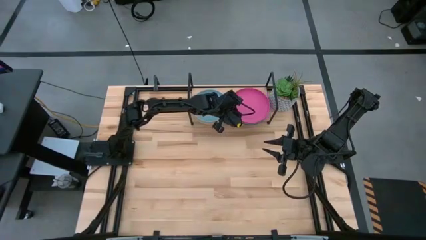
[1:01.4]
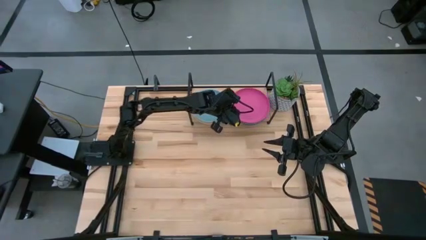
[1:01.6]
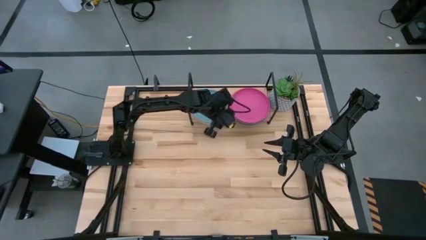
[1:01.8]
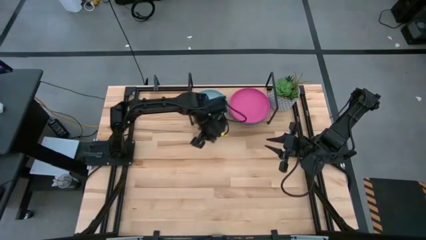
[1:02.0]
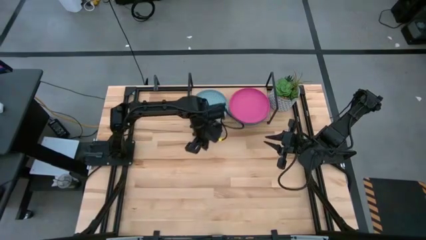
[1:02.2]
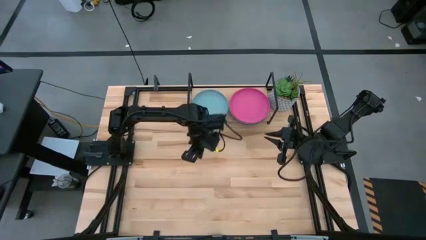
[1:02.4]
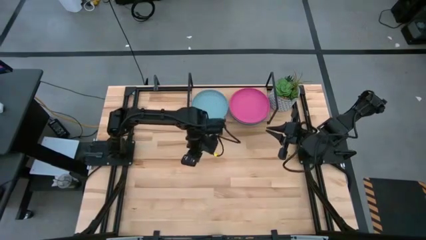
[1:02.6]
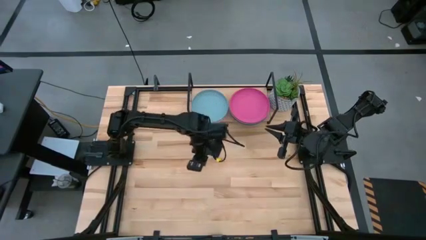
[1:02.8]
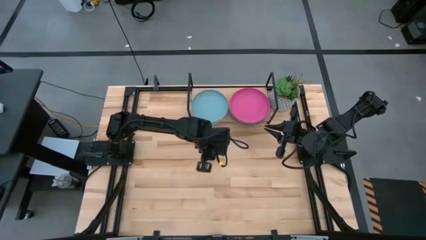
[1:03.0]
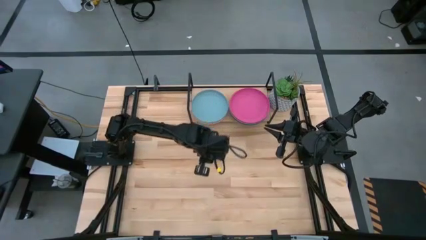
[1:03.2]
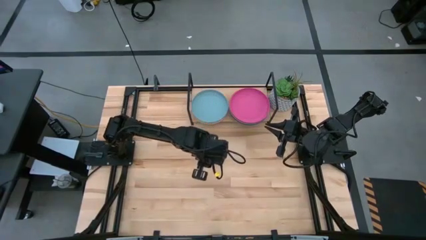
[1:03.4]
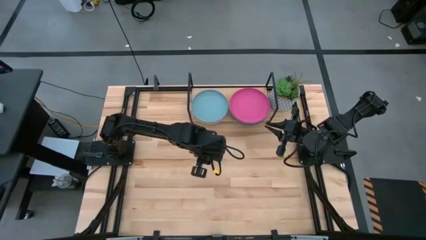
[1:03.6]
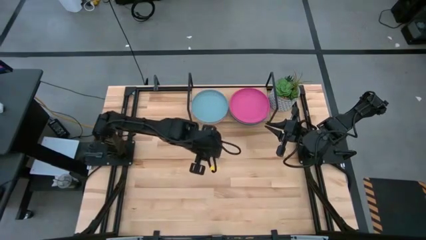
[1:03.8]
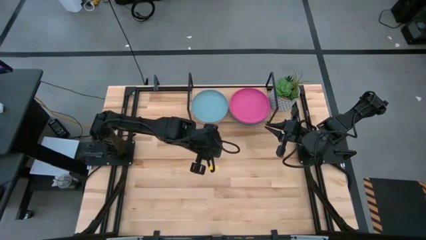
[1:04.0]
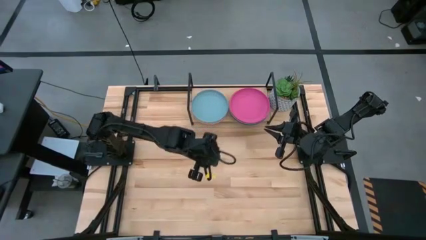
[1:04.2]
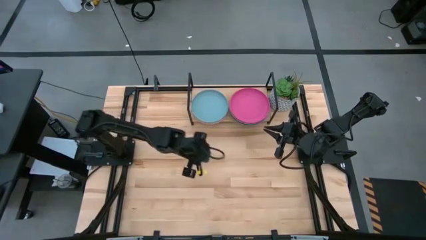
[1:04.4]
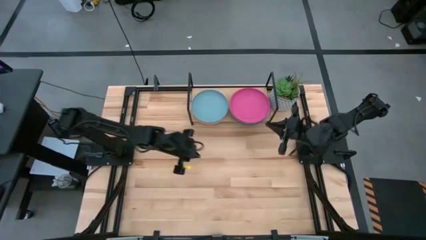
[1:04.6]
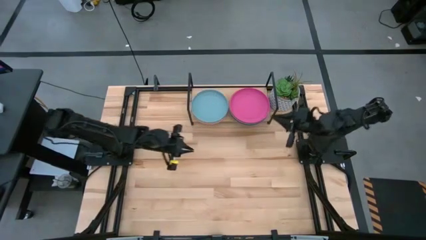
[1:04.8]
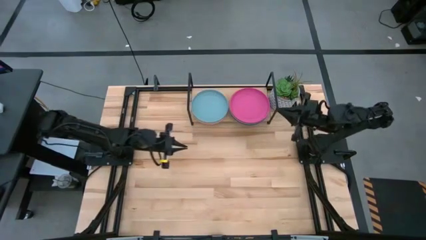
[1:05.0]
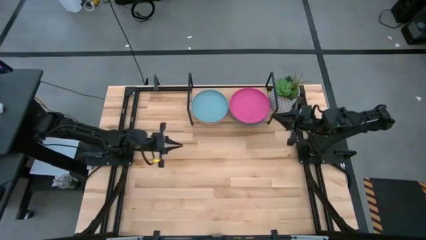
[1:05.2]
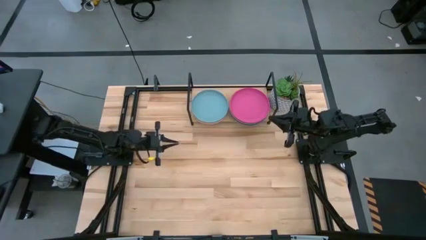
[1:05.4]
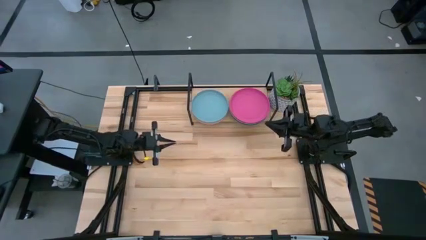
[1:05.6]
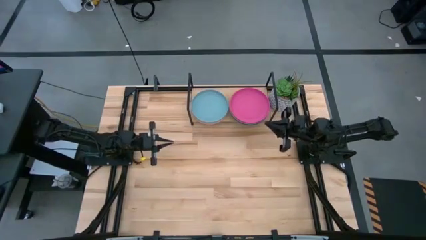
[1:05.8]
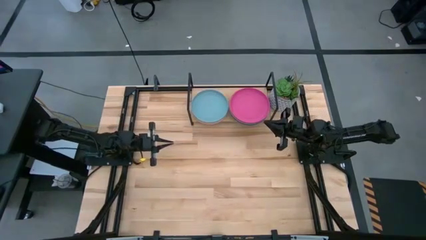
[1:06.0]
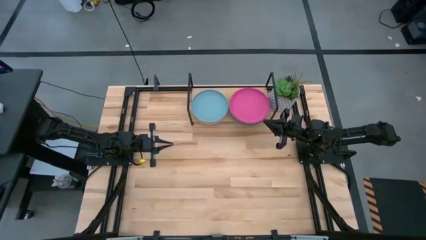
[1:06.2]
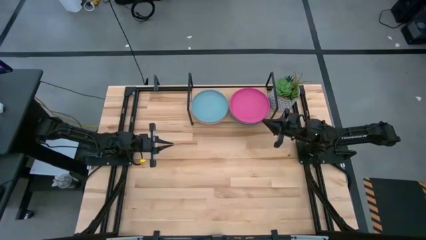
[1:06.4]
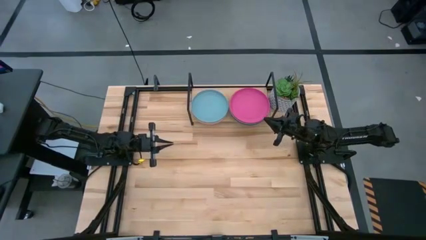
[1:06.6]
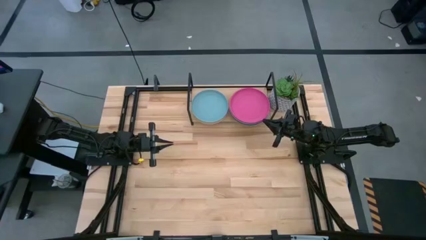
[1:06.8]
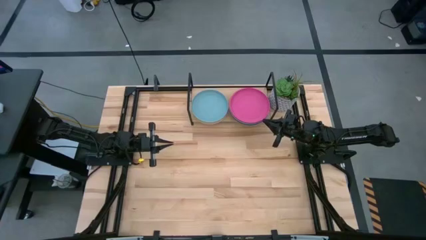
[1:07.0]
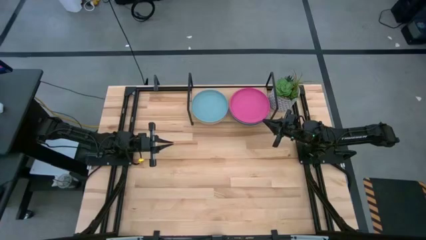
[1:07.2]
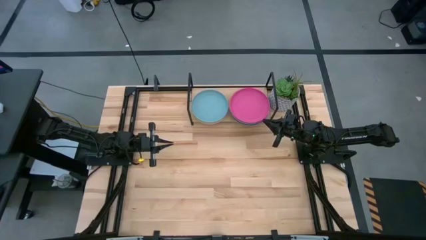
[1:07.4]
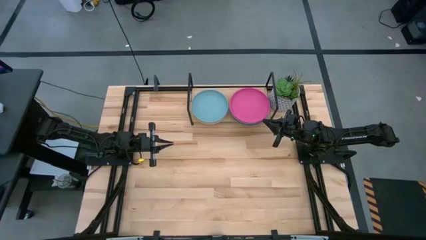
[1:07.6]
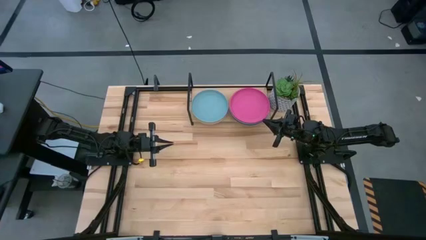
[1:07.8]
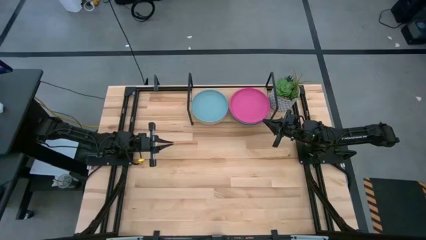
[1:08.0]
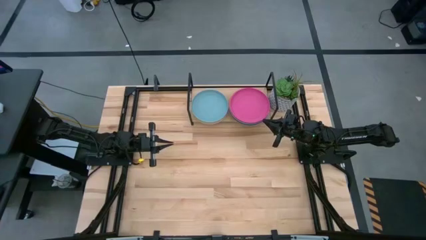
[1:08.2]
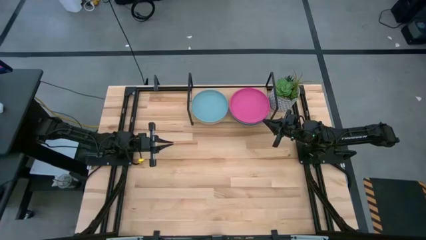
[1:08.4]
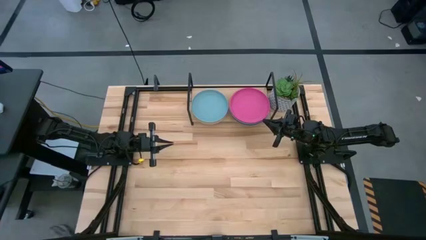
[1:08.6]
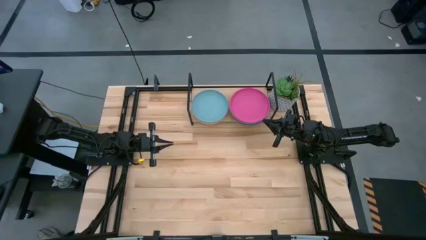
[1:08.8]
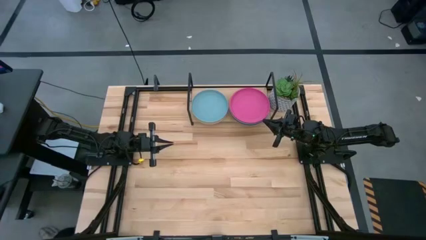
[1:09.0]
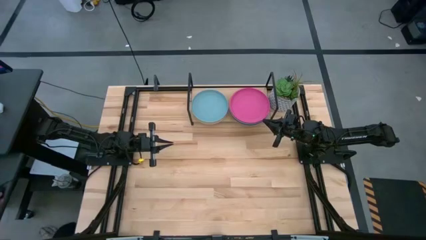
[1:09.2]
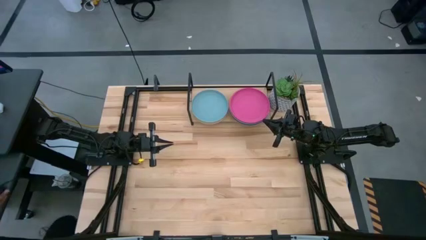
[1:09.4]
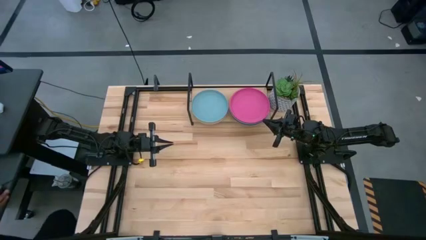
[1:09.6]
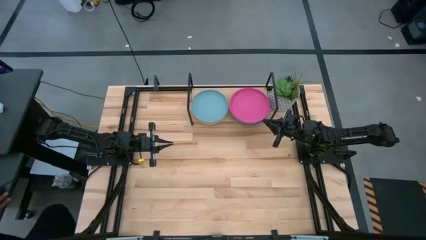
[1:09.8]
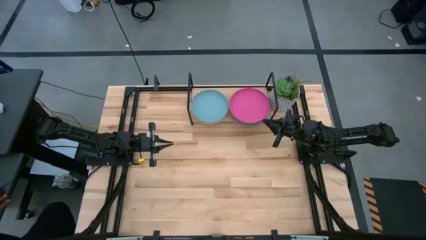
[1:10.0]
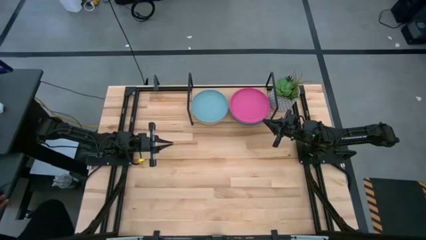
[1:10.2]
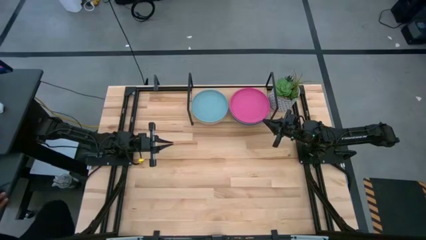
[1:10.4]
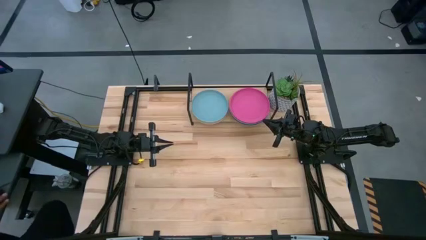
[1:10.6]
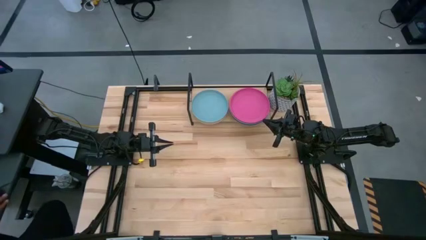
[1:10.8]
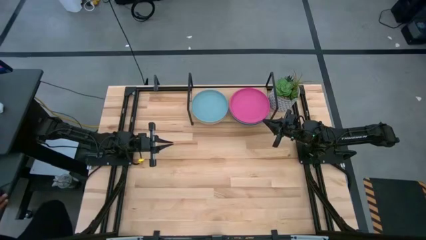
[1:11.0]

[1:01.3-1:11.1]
Task: Place and stack plates onto a shelf
Return to Home Position
